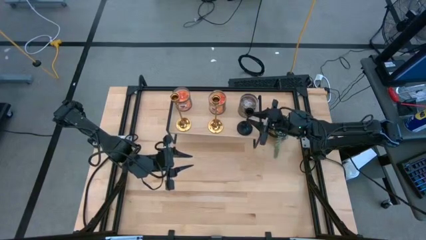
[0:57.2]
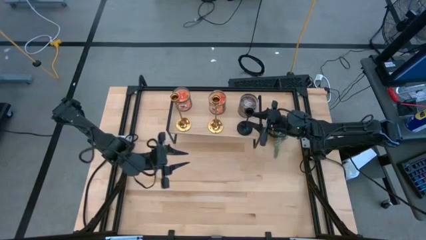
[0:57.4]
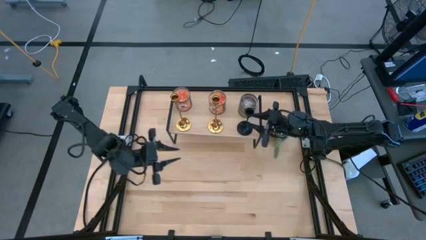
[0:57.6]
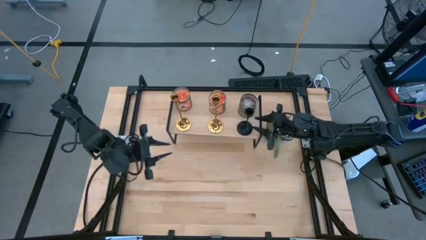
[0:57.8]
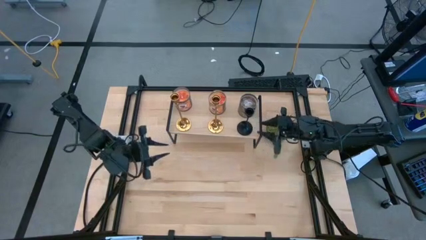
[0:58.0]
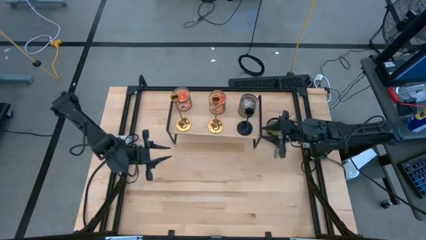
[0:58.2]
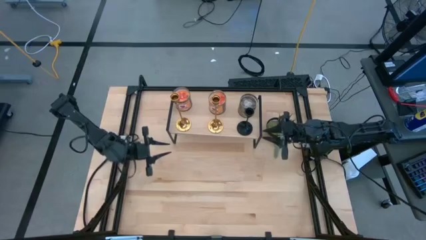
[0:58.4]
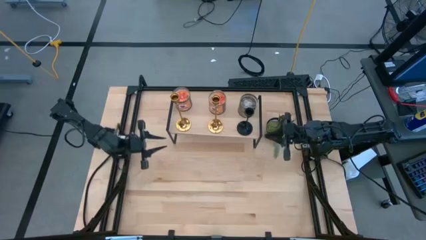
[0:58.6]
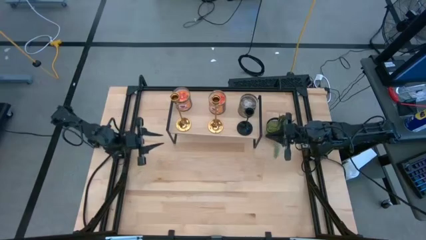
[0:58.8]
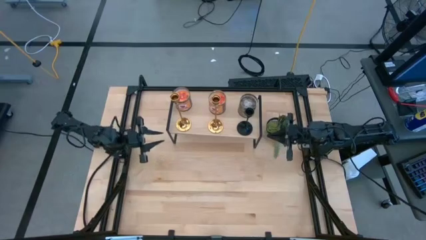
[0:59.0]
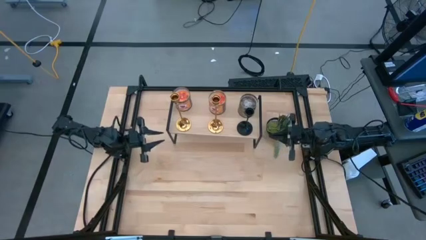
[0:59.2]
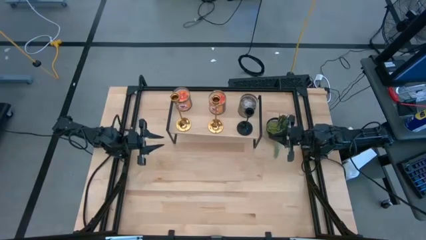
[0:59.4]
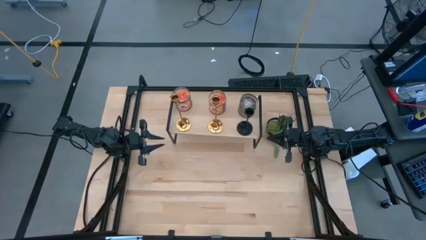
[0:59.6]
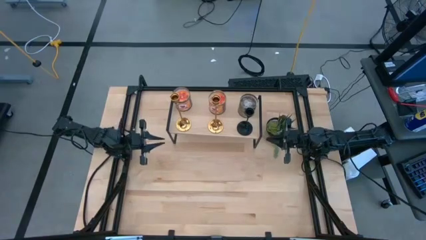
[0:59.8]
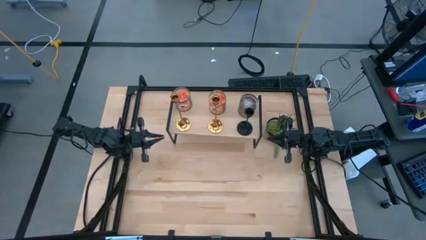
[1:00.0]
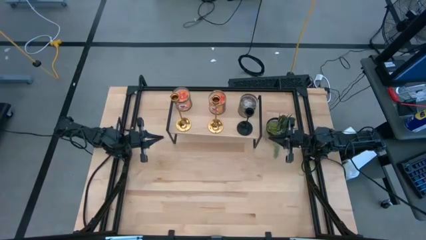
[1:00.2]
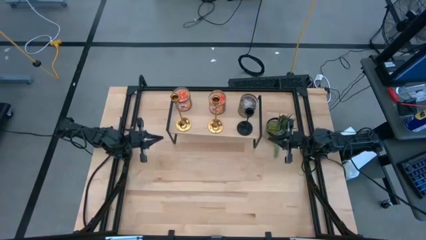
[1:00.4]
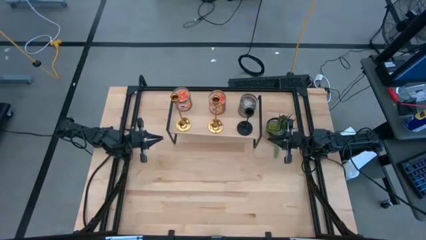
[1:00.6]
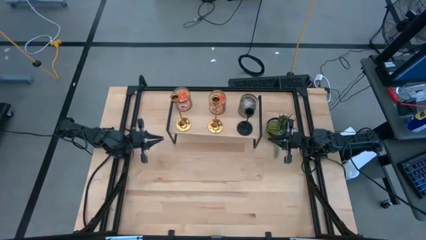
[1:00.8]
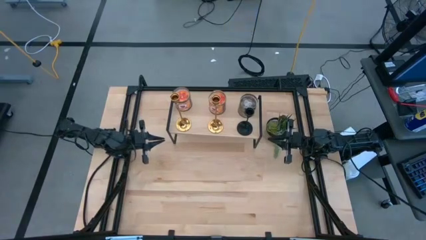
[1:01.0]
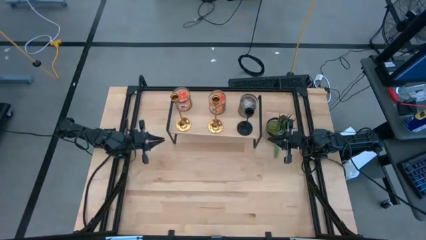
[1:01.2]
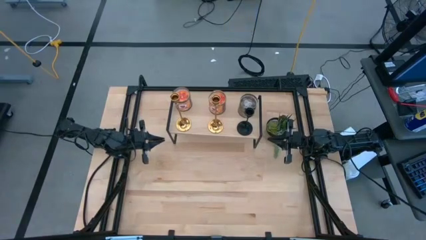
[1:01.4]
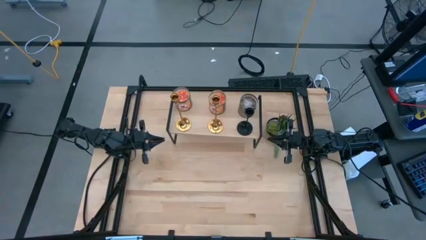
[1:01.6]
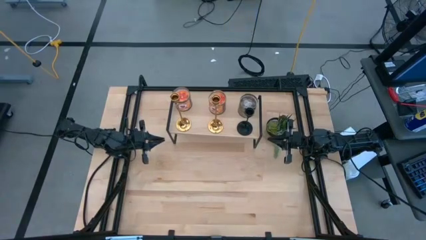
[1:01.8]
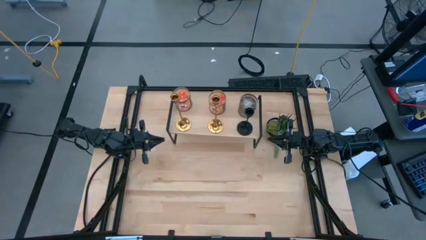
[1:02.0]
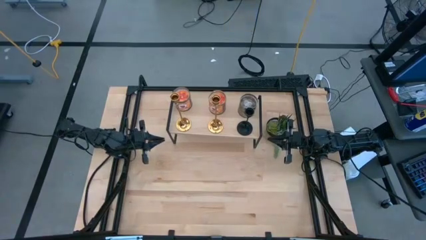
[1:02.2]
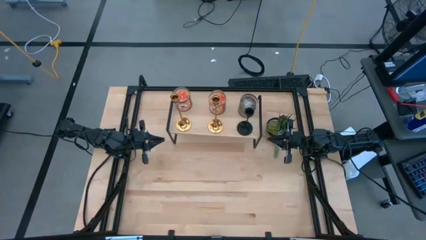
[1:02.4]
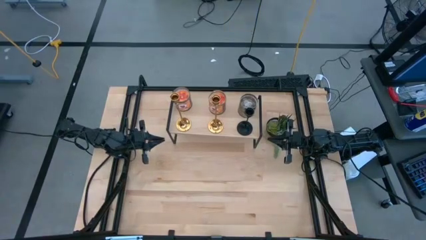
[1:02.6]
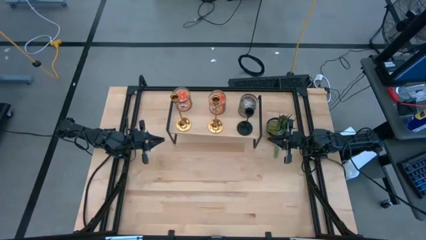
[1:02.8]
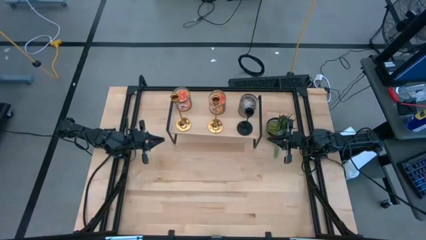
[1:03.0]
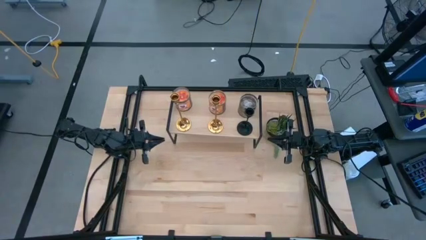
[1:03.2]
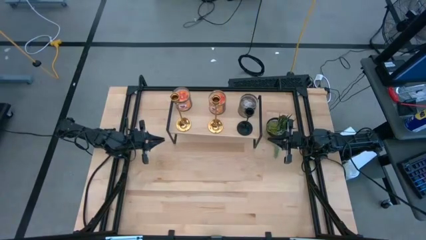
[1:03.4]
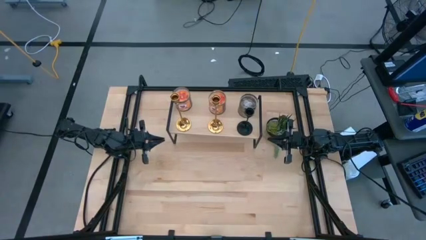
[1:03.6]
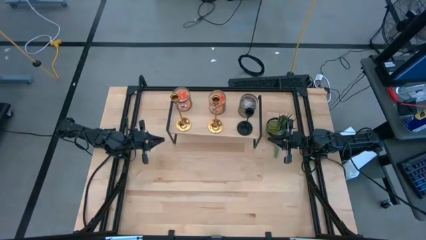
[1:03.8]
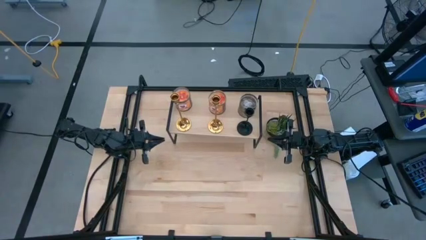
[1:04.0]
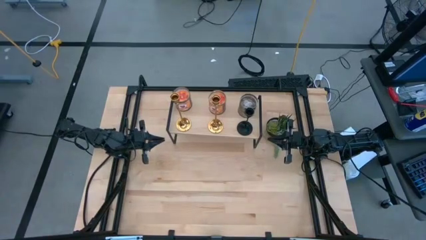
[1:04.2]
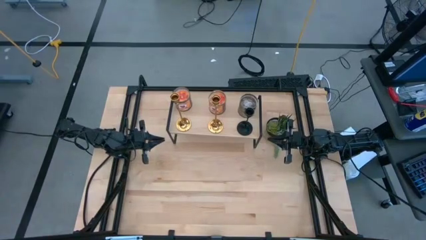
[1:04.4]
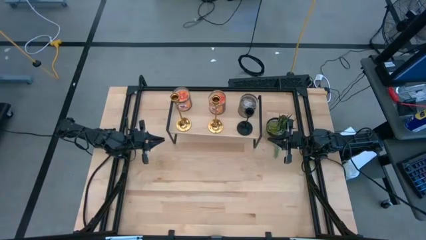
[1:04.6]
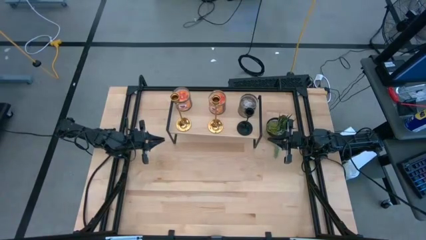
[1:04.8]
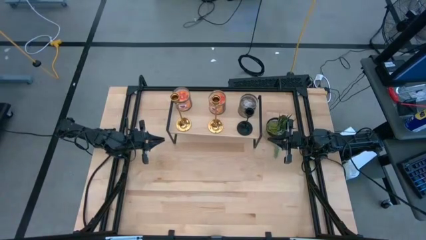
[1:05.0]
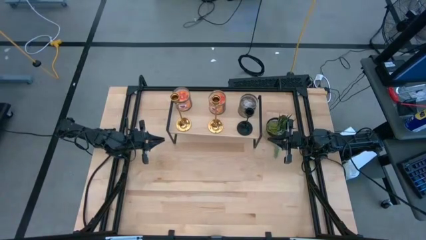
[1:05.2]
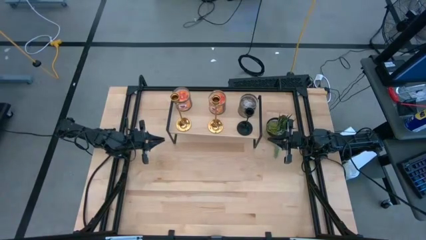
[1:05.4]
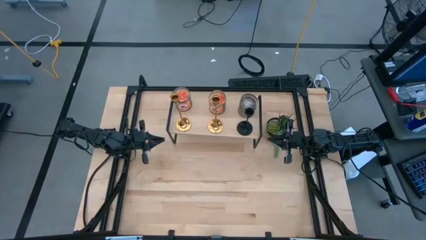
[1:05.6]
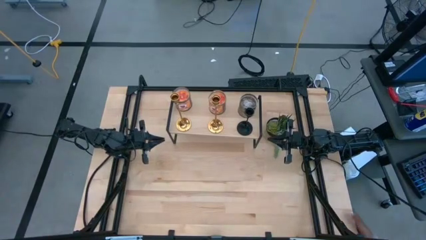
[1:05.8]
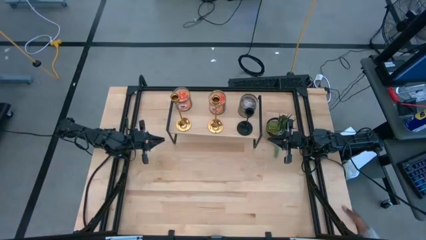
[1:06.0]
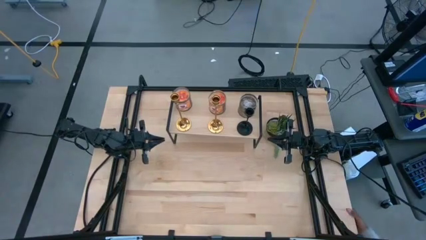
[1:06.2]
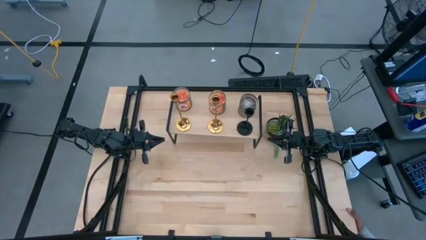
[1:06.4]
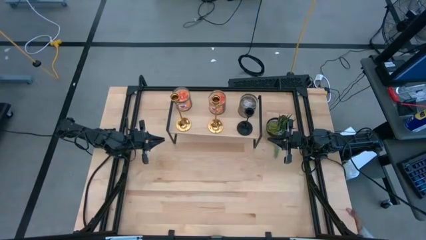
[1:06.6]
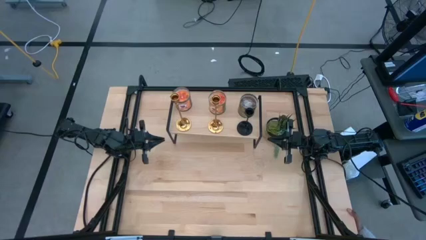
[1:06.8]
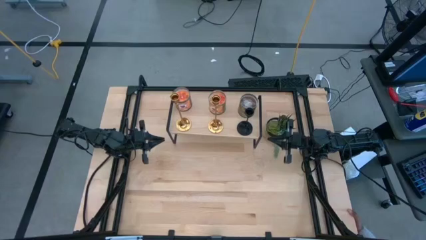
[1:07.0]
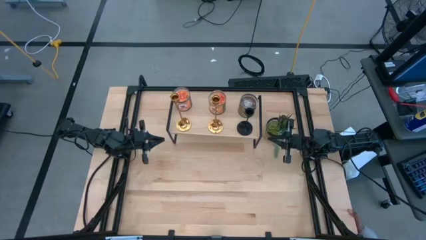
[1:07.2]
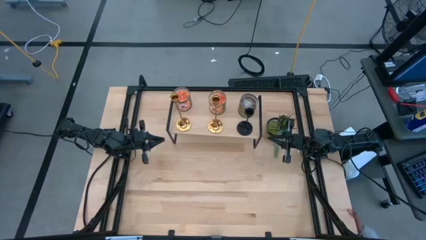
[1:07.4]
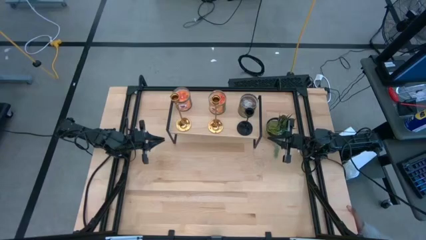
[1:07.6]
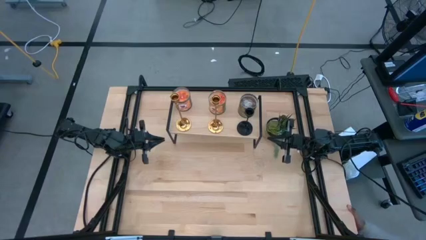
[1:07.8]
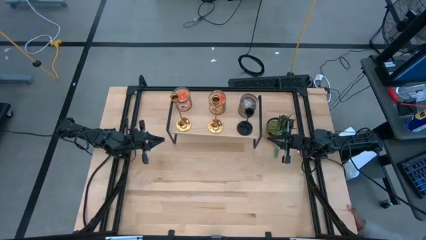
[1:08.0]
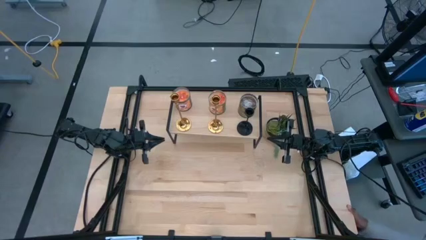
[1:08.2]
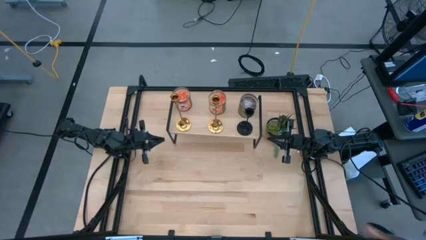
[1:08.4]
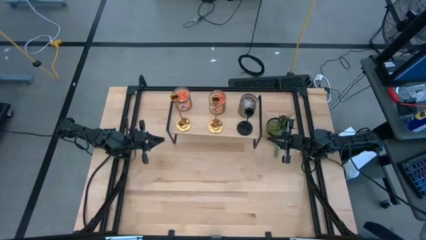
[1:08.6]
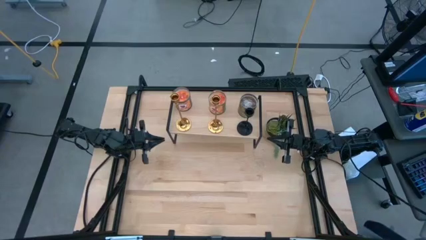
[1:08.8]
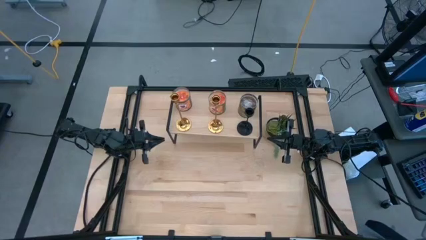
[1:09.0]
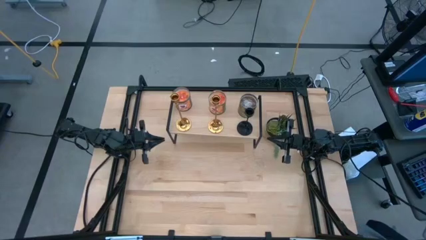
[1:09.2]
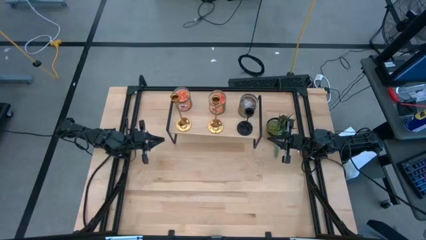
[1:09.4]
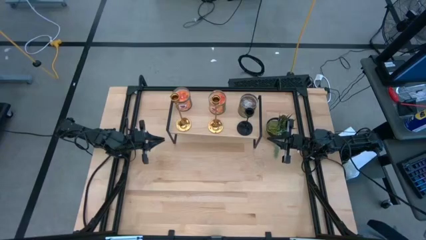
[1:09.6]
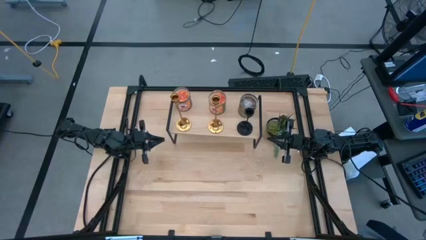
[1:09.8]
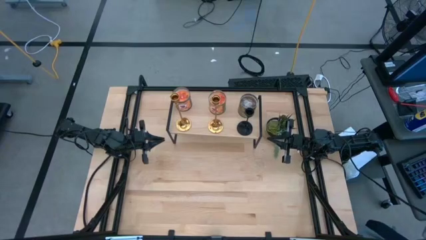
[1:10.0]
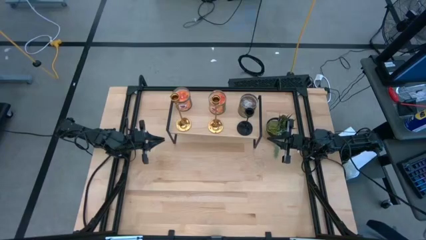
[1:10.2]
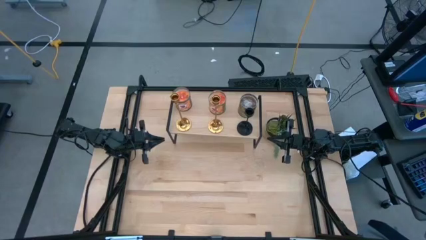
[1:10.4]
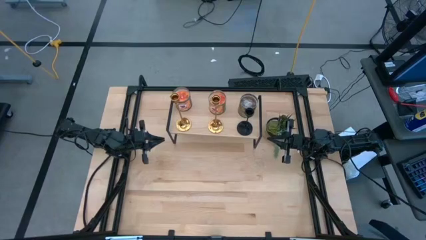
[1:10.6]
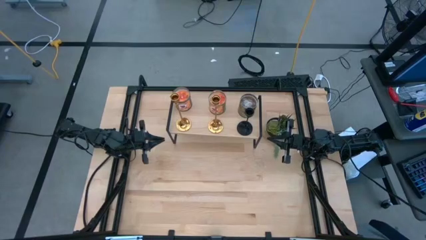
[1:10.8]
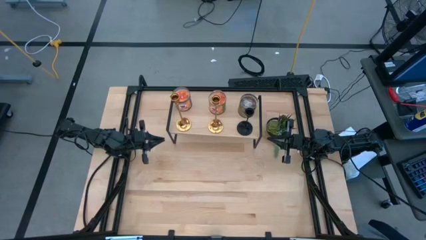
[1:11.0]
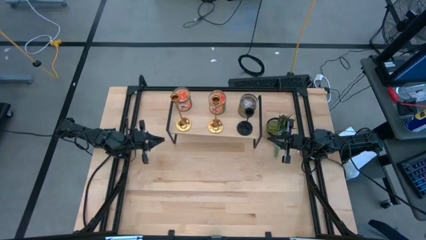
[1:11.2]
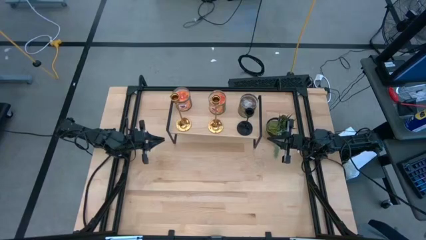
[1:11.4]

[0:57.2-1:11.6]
Task: Pick & Place candle stick holders
Return to Home Position

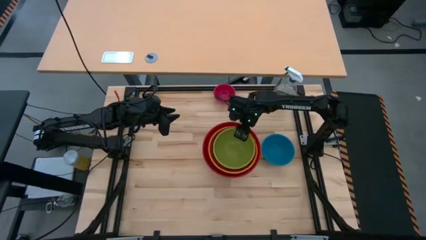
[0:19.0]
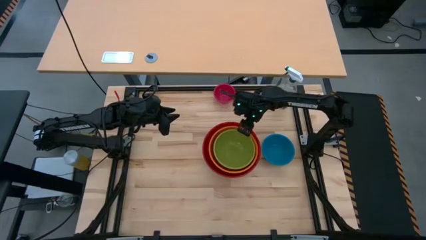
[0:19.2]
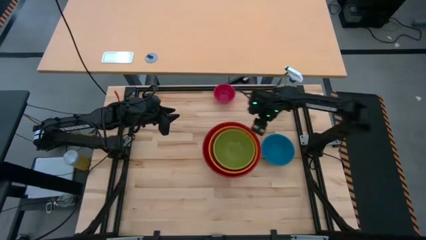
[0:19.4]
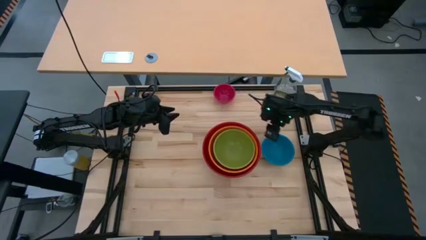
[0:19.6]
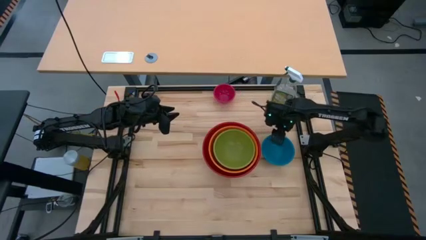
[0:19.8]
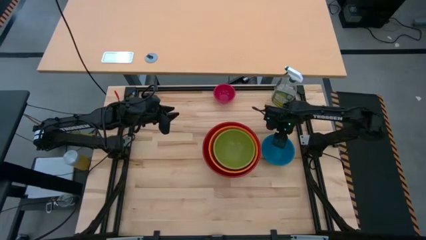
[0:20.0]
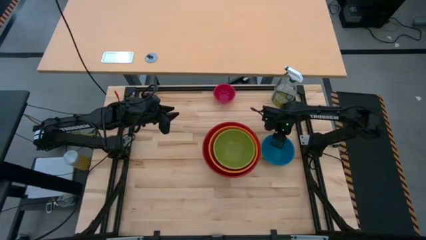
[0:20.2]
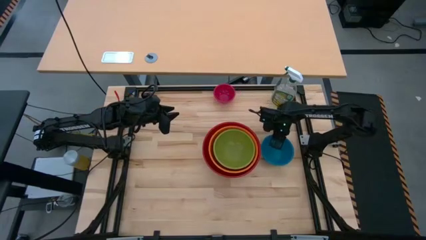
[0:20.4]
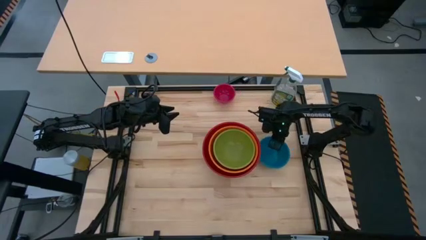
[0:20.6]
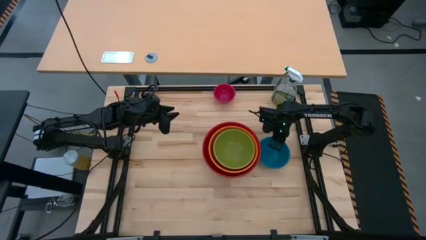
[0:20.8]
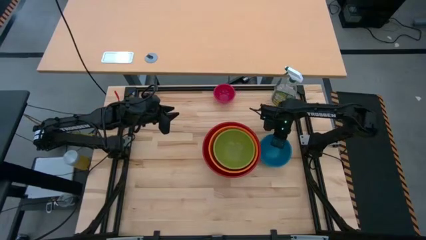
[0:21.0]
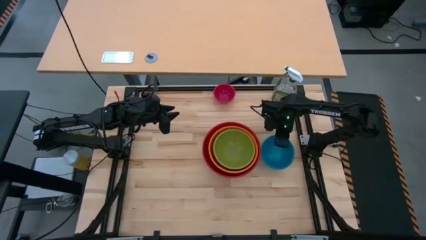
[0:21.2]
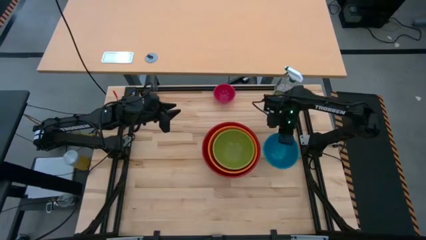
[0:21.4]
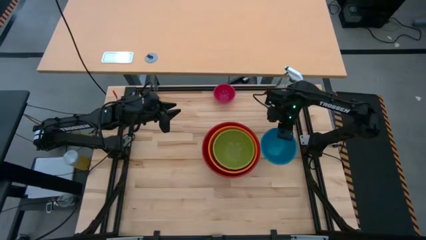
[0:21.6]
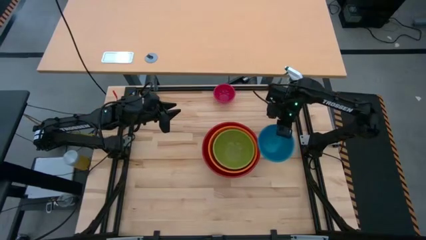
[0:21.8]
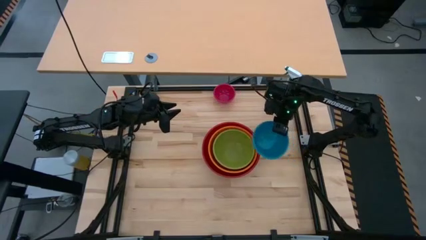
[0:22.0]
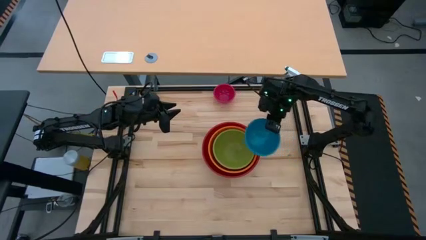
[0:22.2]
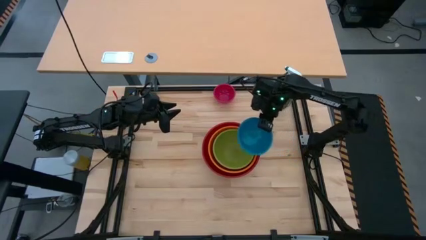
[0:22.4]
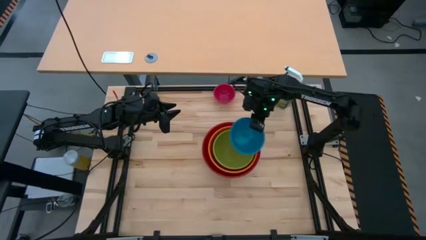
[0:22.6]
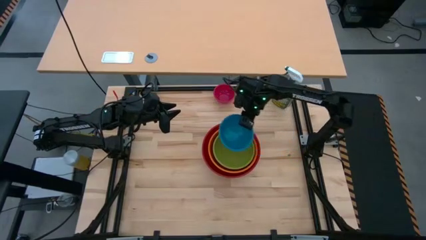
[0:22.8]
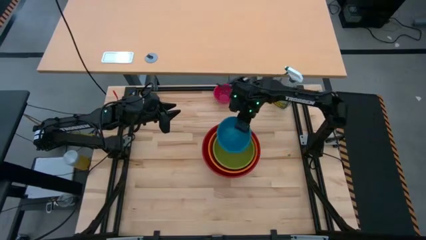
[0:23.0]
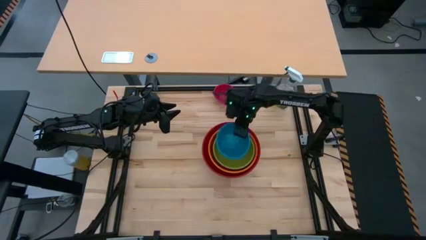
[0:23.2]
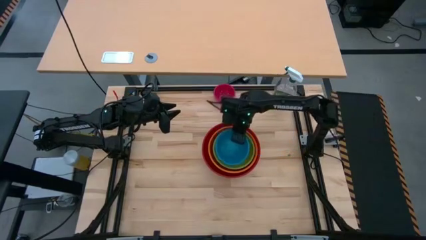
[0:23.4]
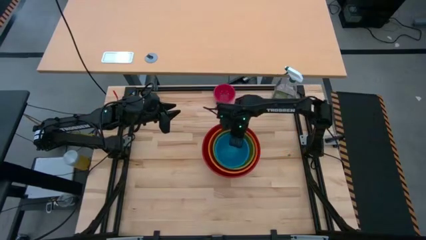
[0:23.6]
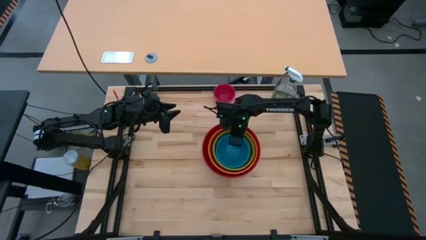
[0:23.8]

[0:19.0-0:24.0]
Task: Nest bowls inside each other by size order
Stack the blue bowl on top of the green bowl
